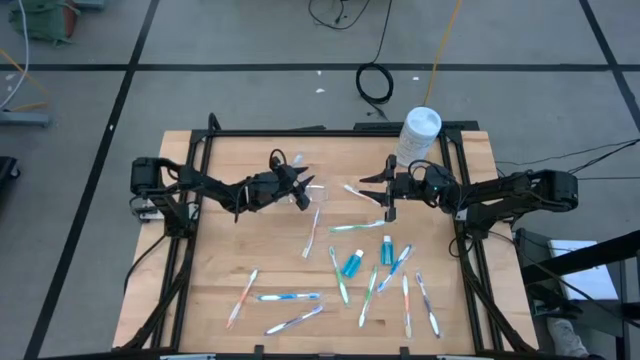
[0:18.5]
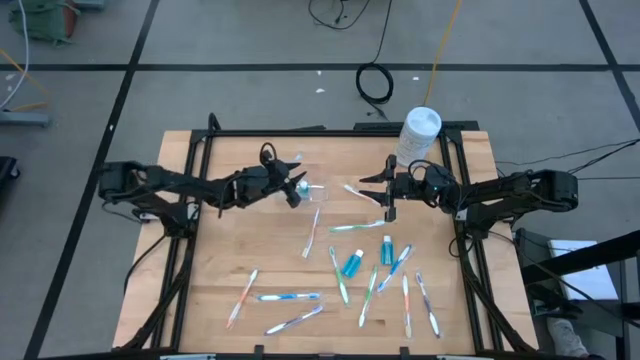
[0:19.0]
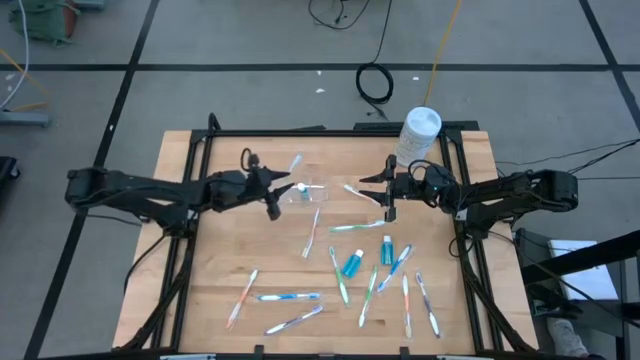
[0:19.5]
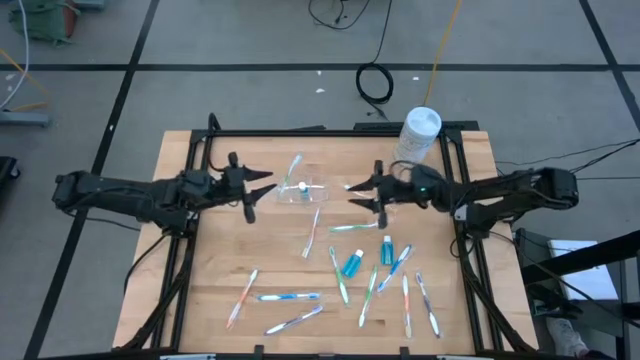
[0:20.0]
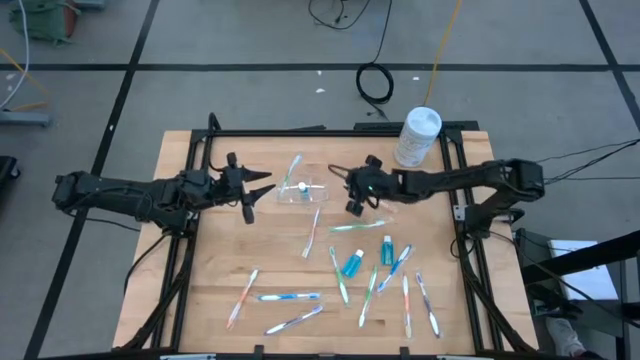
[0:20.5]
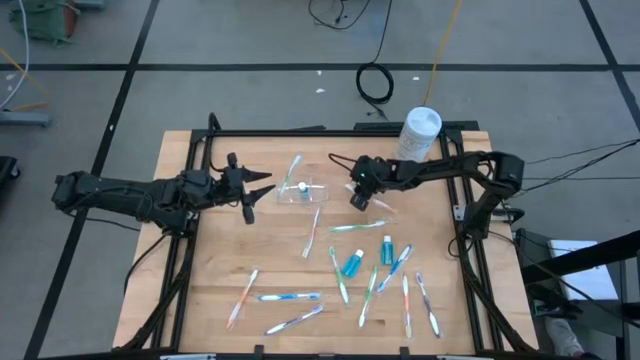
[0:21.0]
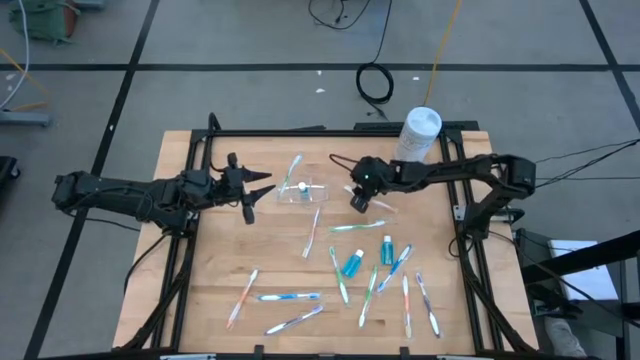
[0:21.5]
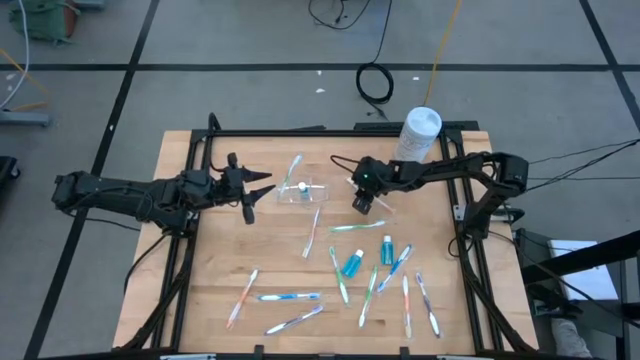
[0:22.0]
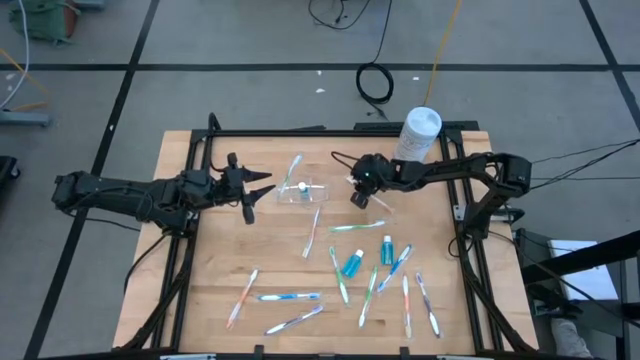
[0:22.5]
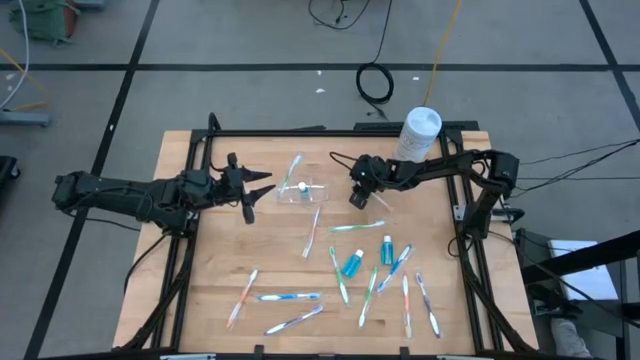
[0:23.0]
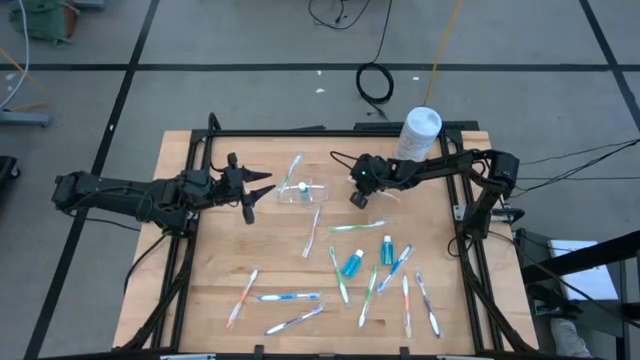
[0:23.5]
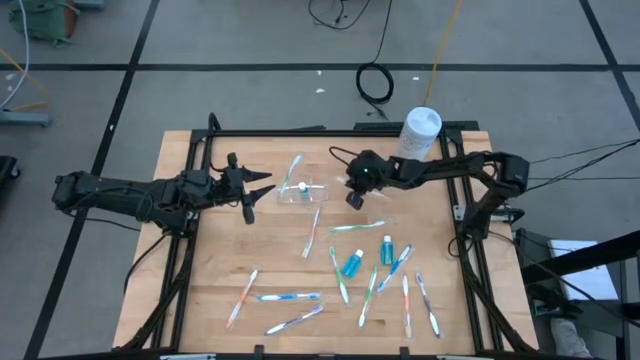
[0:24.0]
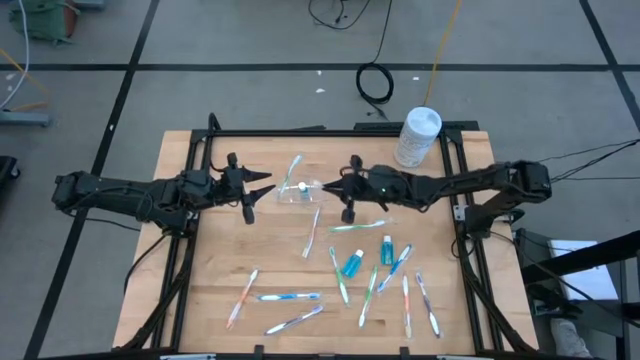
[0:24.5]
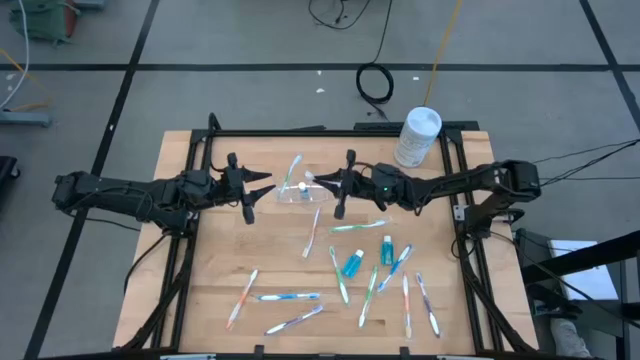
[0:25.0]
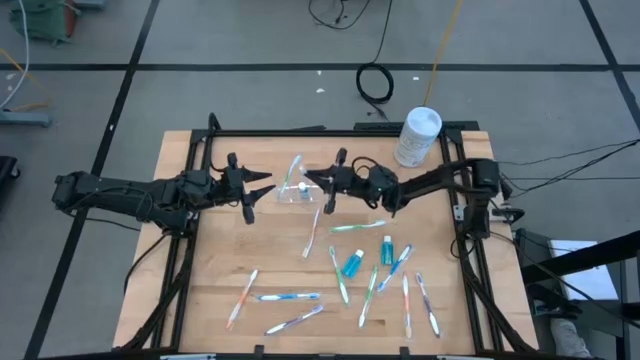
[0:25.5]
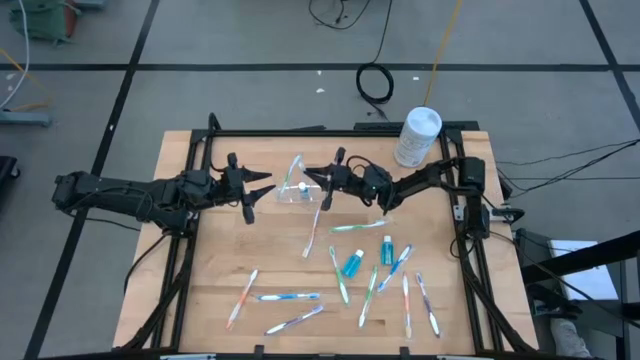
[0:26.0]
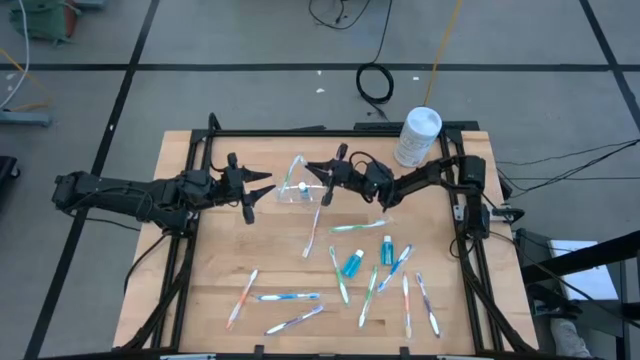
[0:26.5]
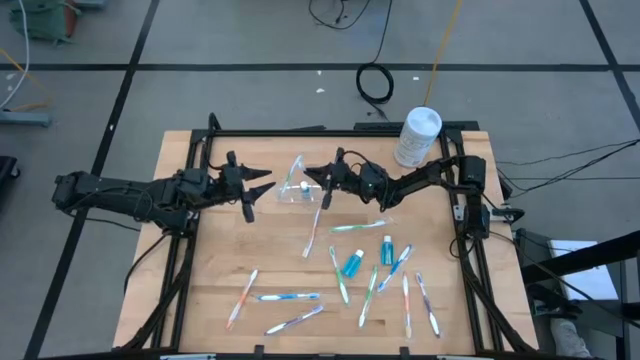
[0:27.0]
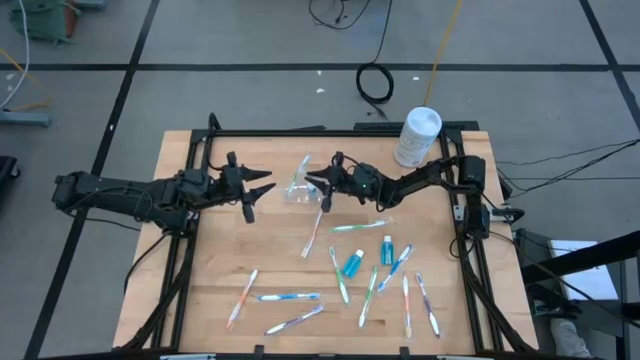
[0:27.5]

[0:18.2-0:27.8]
Task: Pick & Place toothbrushing station
Put the orange toothbrush into the transparent organizer

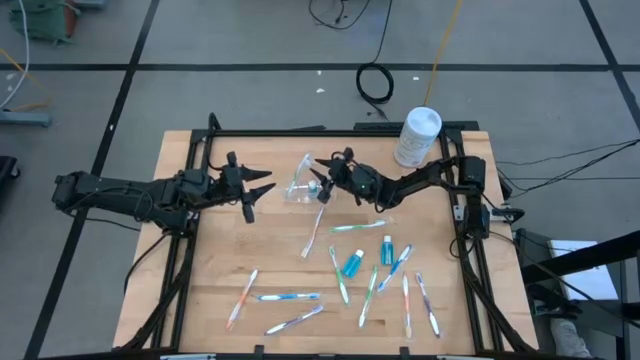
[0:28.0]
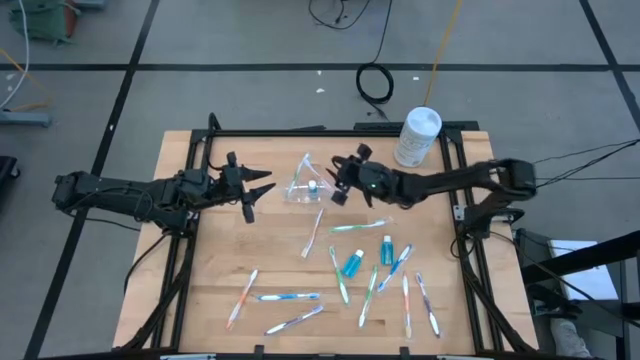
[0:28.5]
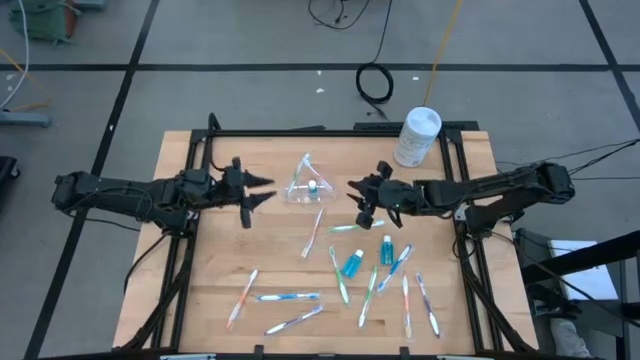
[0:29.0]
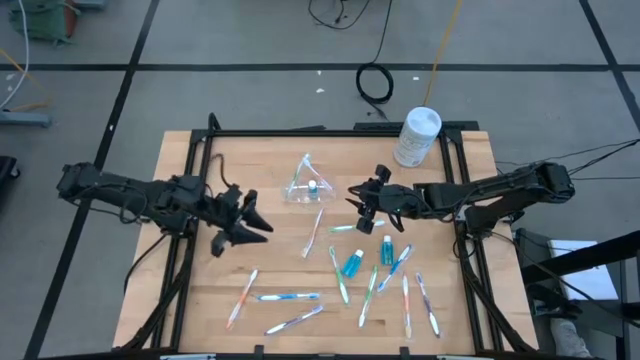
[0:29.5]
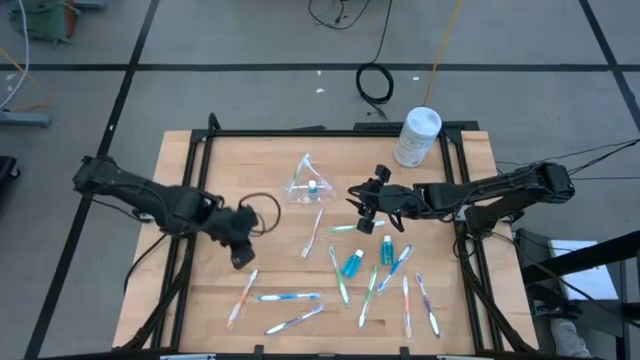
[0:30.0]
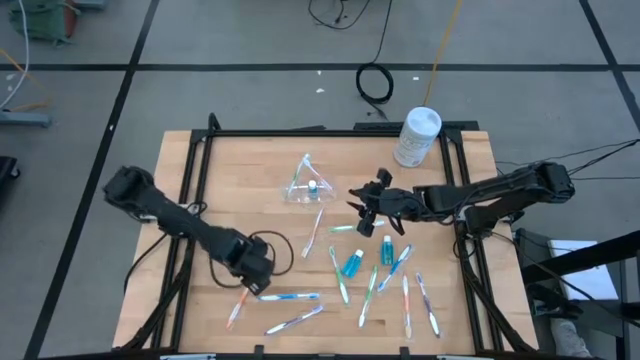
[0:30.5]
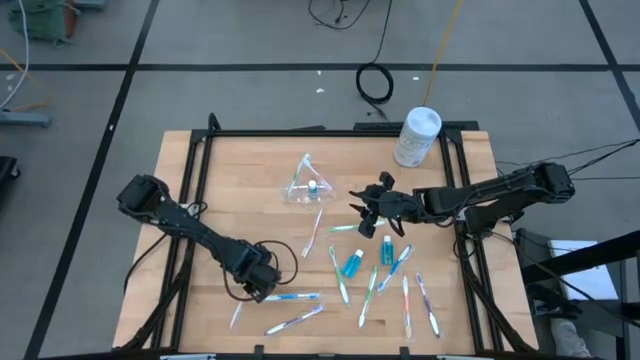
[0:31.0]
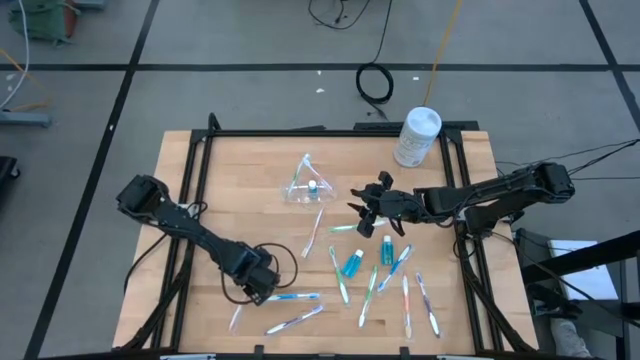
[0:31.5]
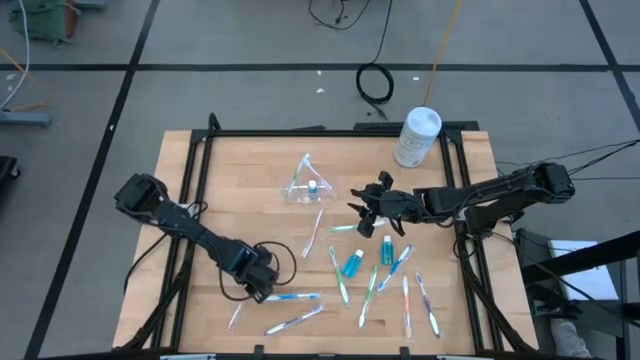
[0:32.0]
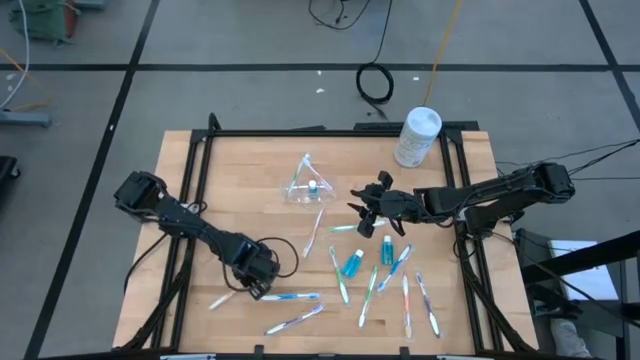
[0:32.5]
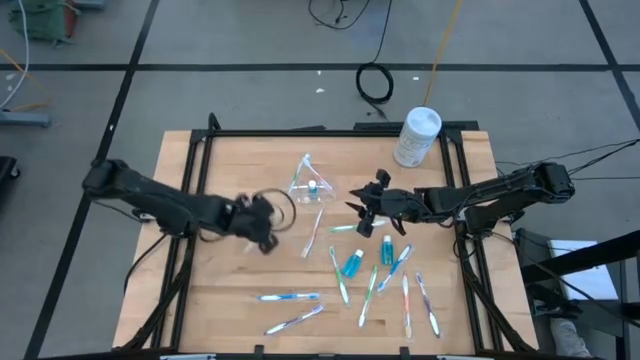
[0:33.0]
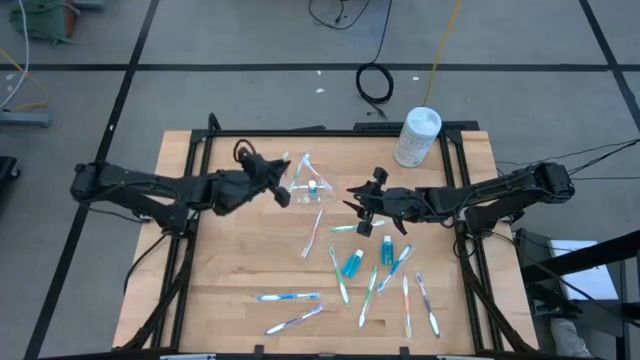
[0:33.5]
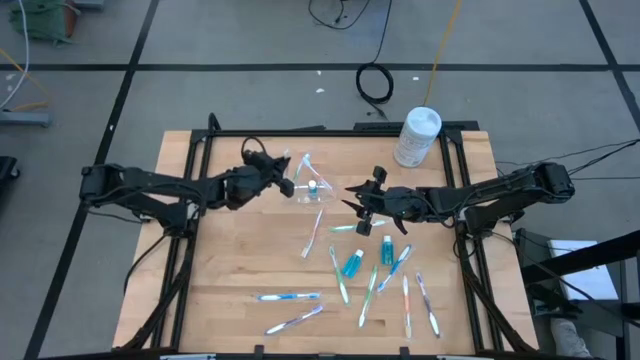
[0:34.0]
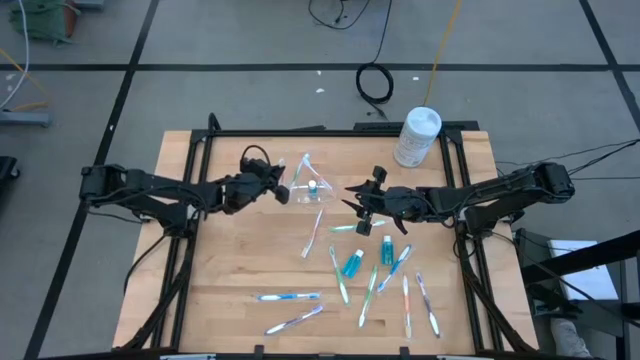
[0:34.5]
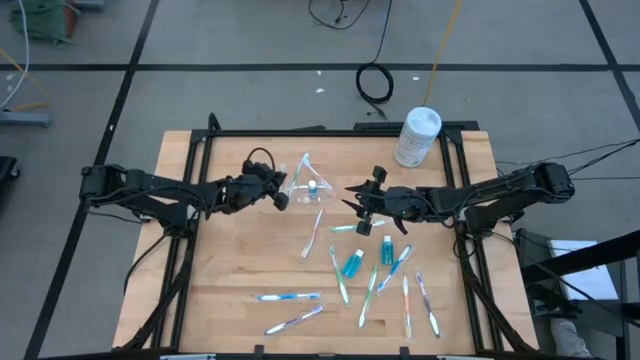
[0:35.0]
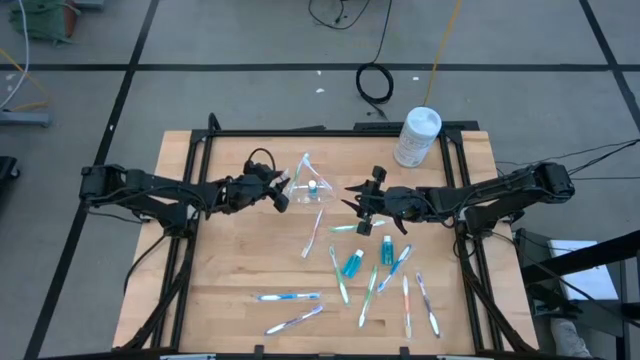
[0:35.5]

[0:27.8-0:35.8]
Put the orange toothbrush into the transparent organizer

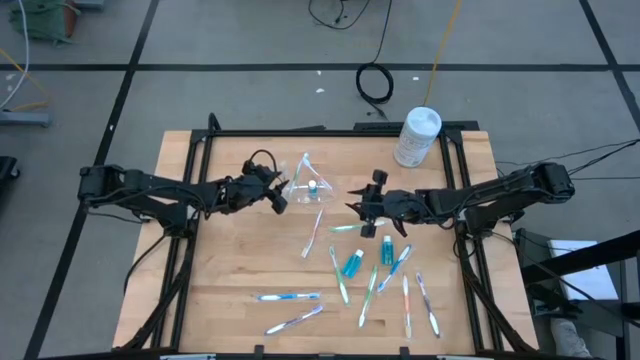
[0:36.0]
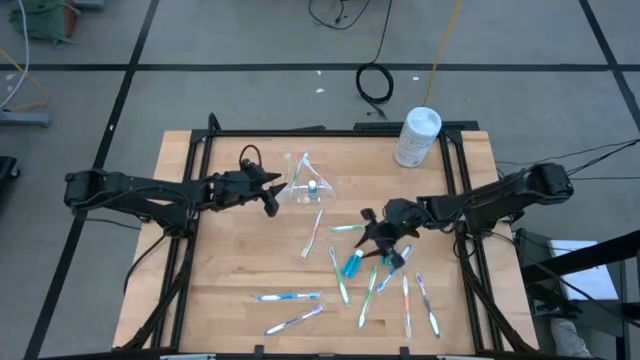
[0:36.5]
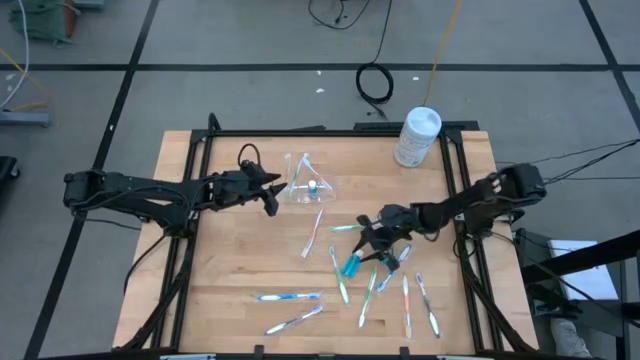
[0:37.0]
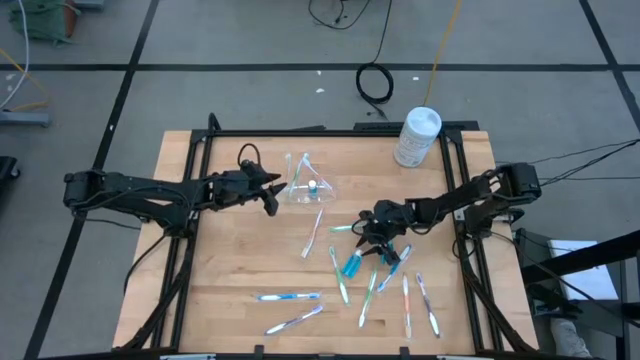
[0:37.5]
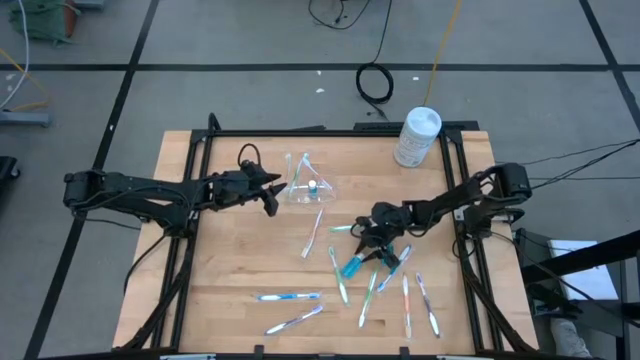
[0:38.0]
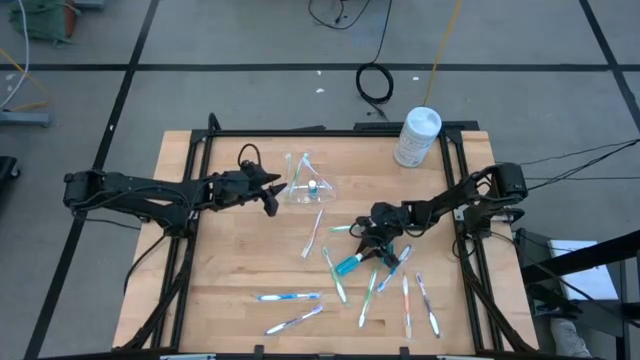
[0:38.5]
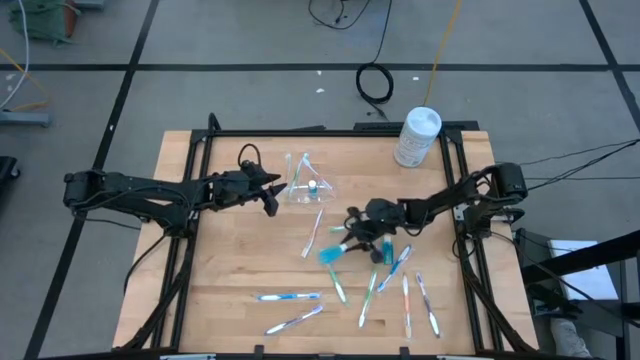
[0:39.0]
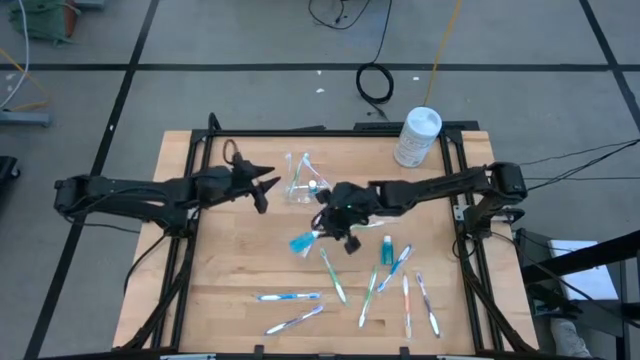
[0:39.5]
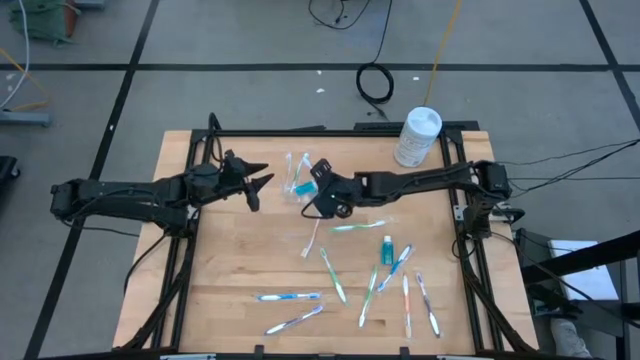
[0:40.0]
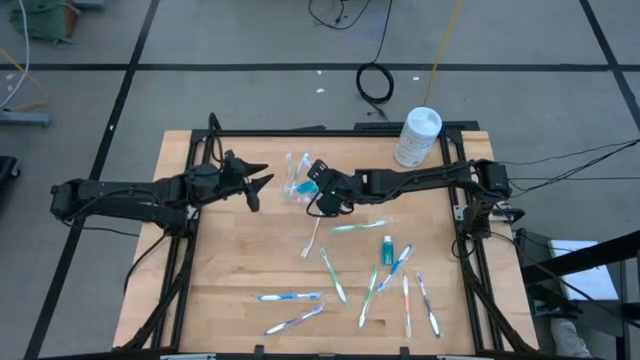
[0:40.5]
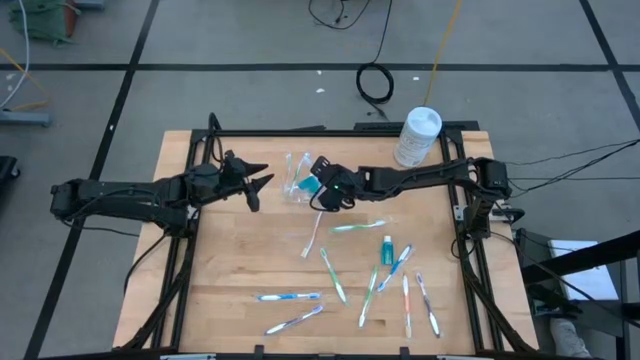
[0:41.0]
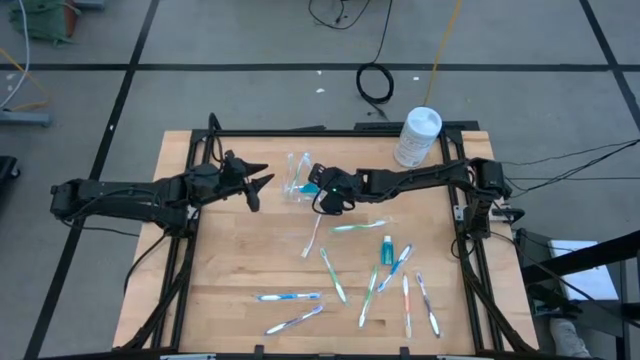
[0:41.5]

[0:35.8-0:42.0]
Put the blue mouthwash into the transparent organizer
